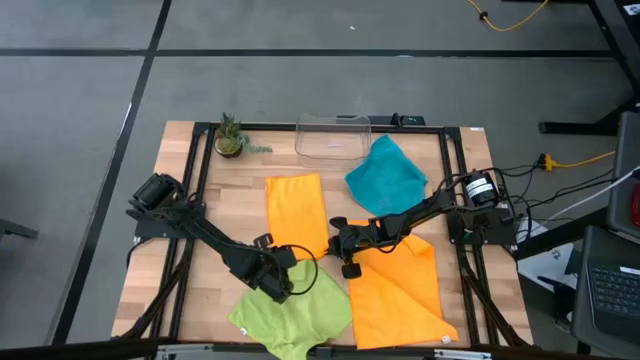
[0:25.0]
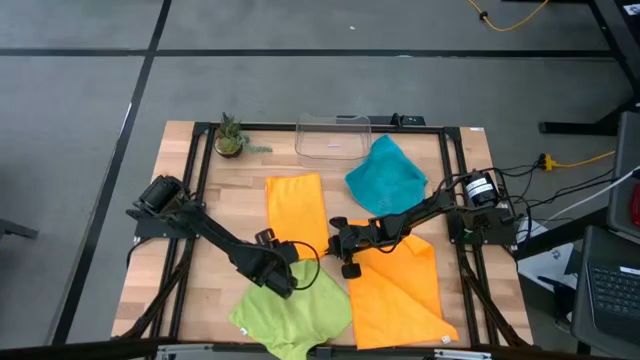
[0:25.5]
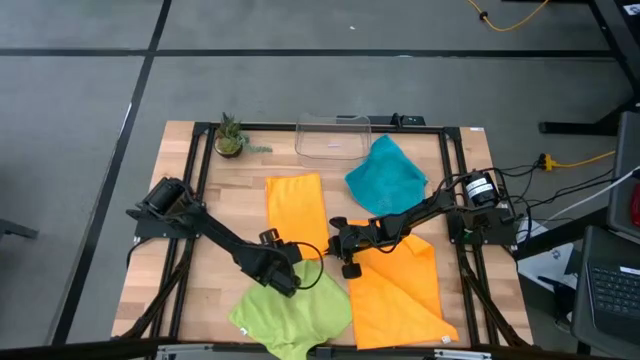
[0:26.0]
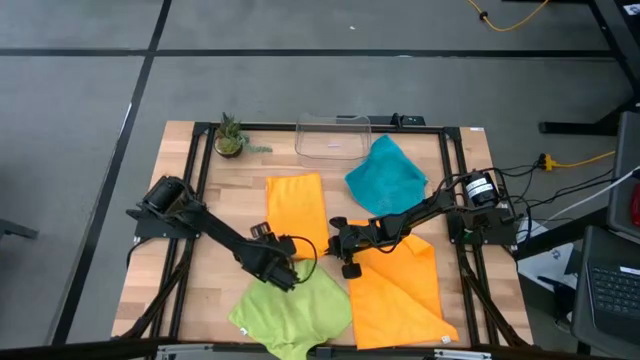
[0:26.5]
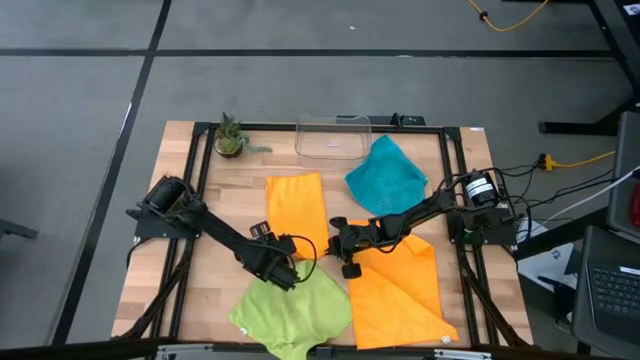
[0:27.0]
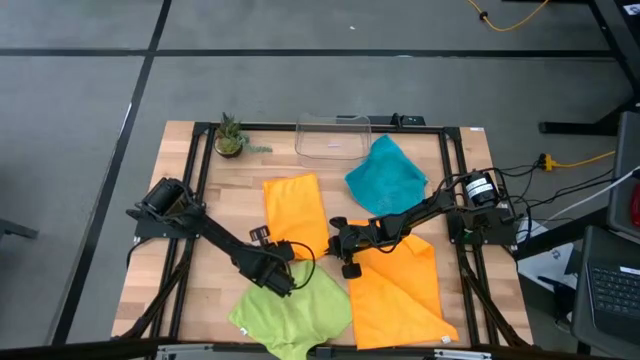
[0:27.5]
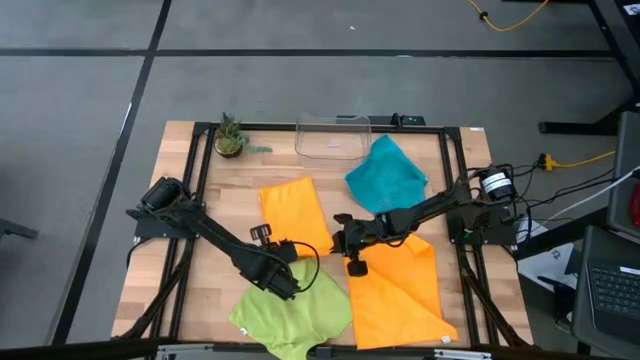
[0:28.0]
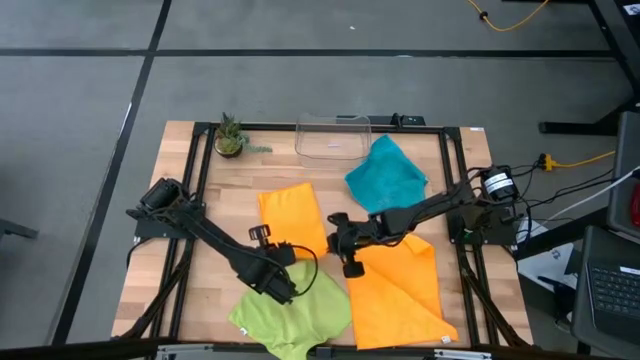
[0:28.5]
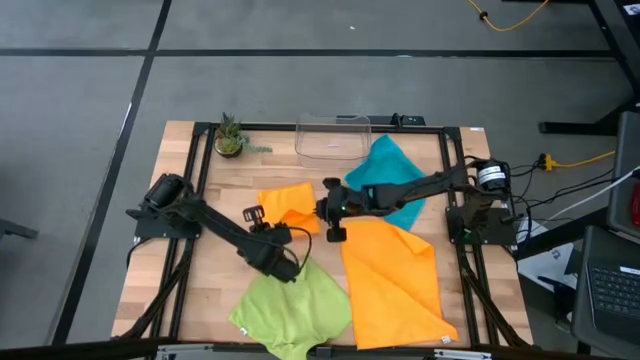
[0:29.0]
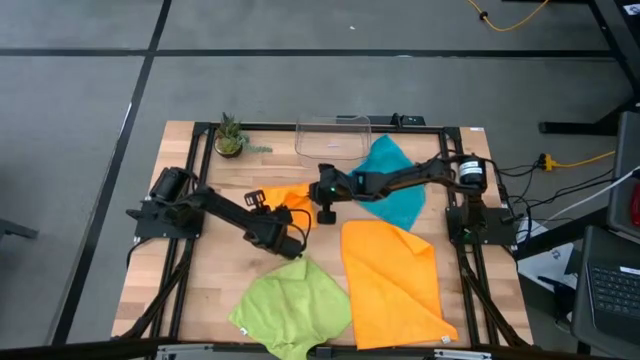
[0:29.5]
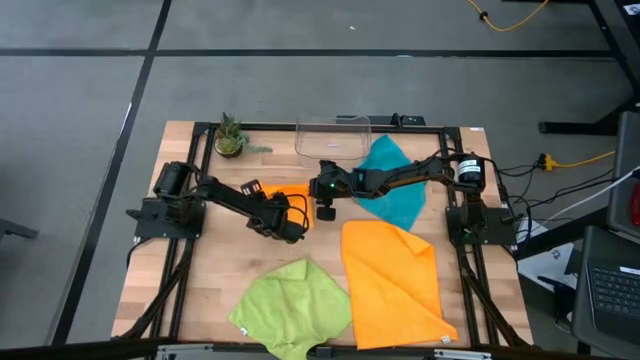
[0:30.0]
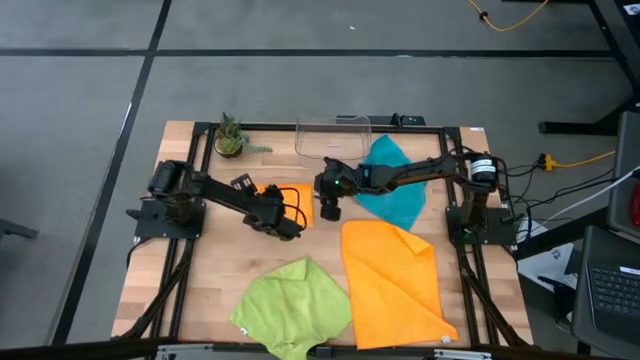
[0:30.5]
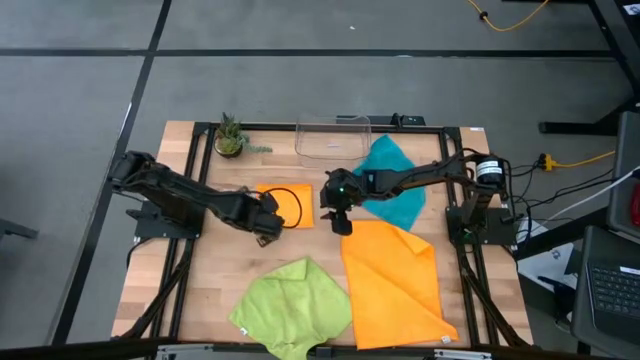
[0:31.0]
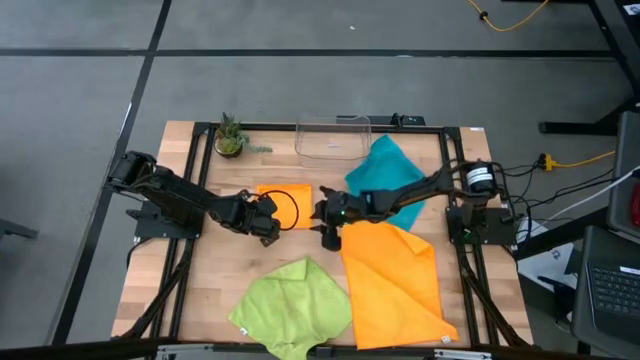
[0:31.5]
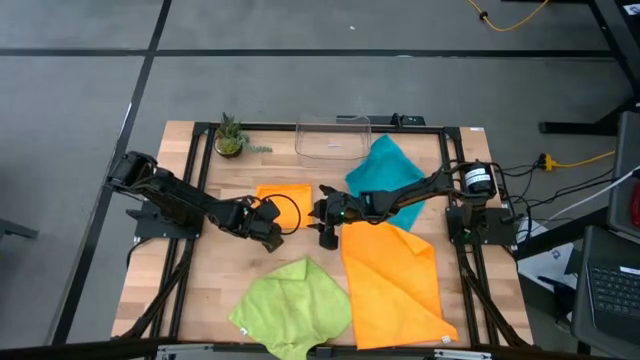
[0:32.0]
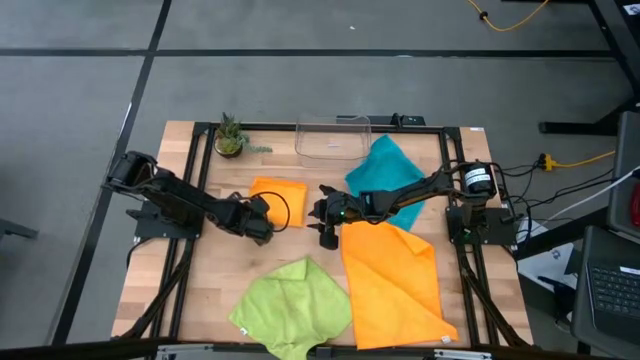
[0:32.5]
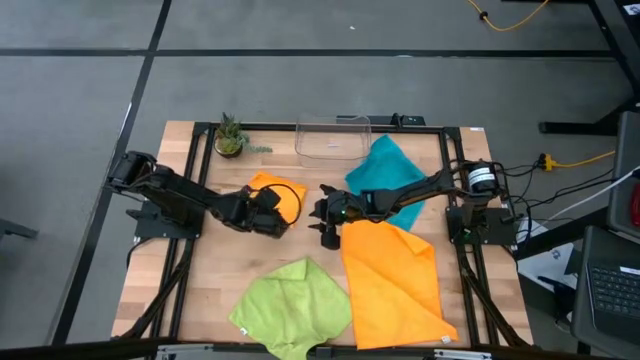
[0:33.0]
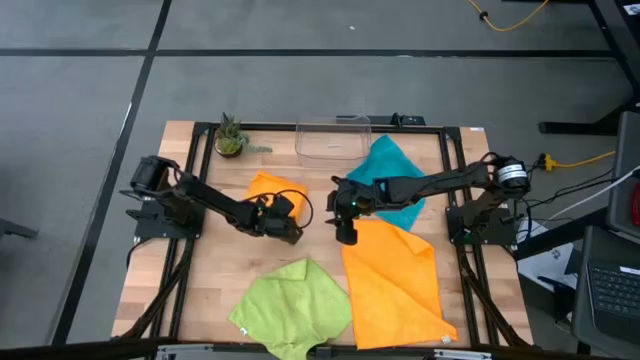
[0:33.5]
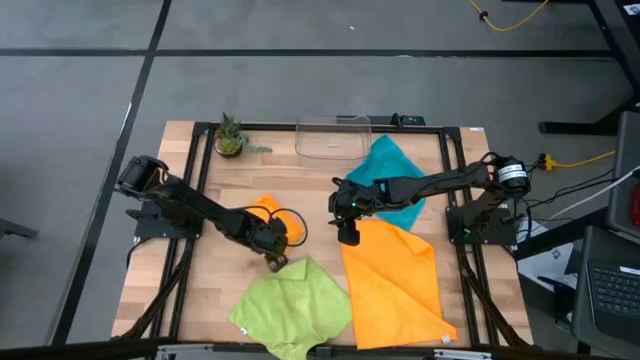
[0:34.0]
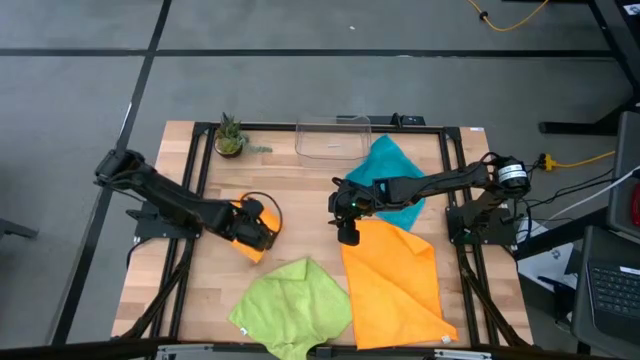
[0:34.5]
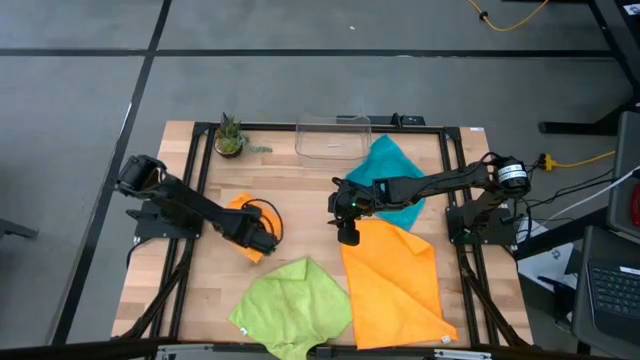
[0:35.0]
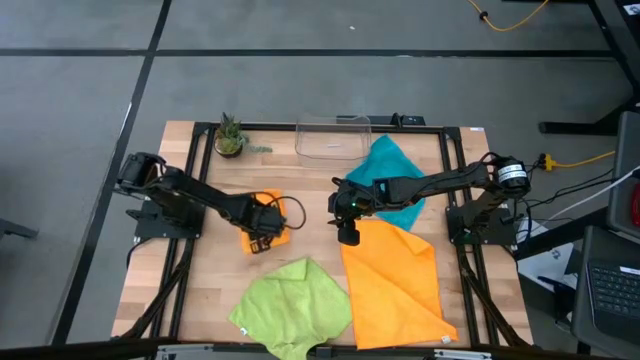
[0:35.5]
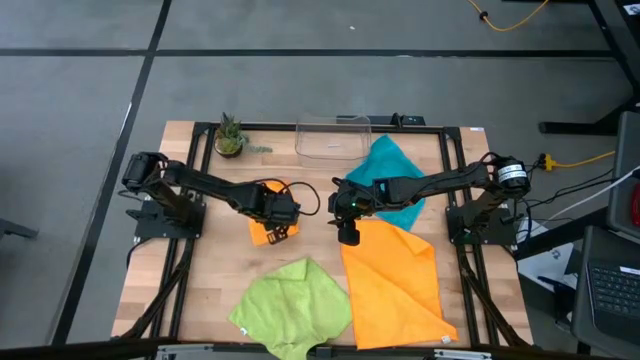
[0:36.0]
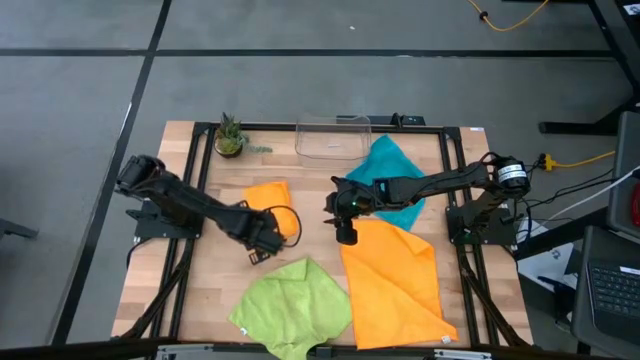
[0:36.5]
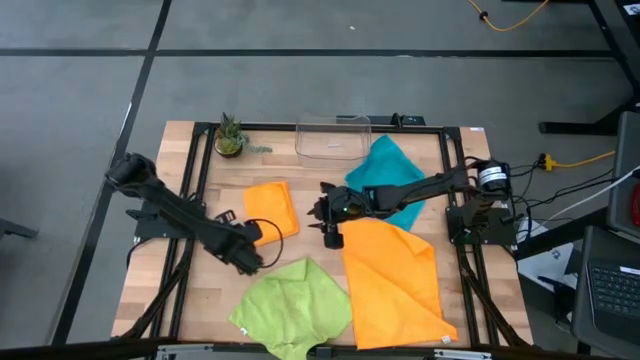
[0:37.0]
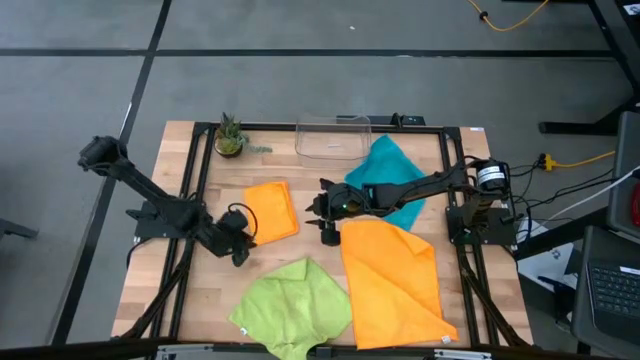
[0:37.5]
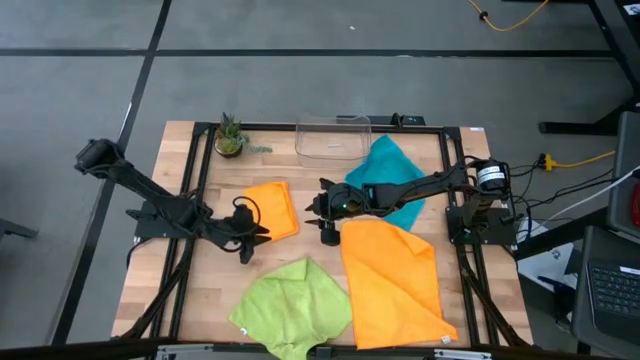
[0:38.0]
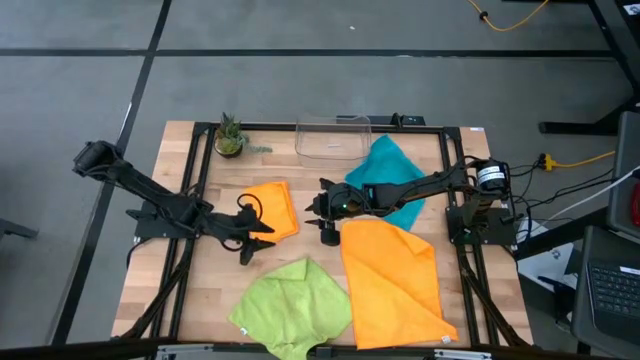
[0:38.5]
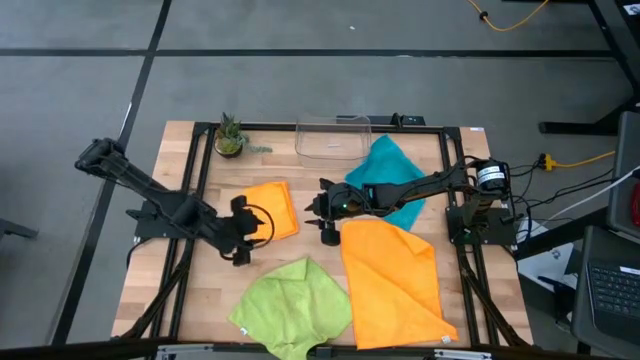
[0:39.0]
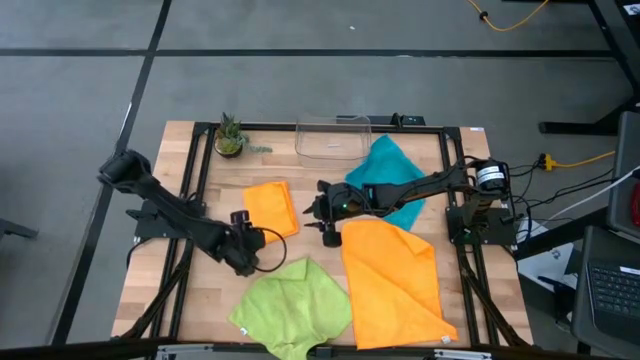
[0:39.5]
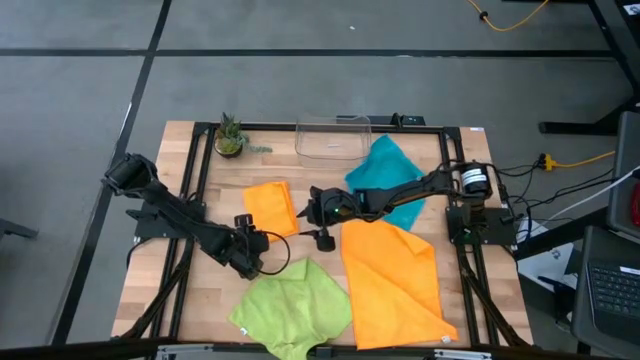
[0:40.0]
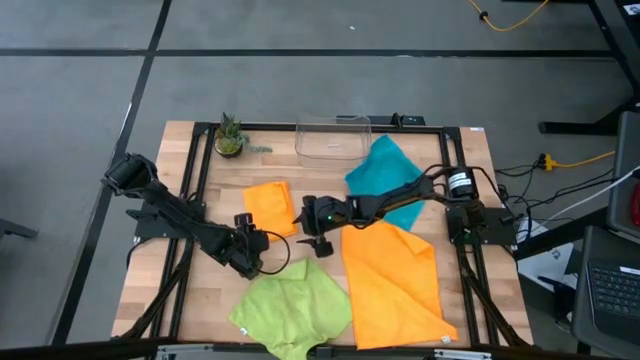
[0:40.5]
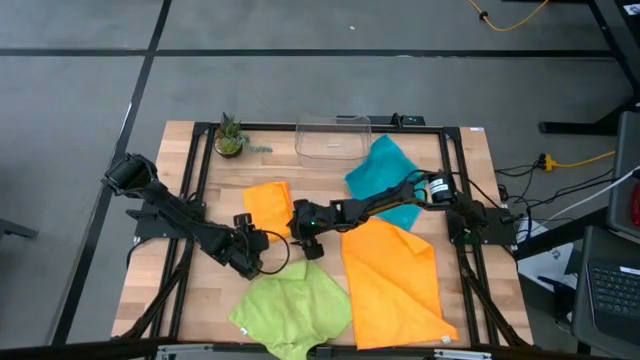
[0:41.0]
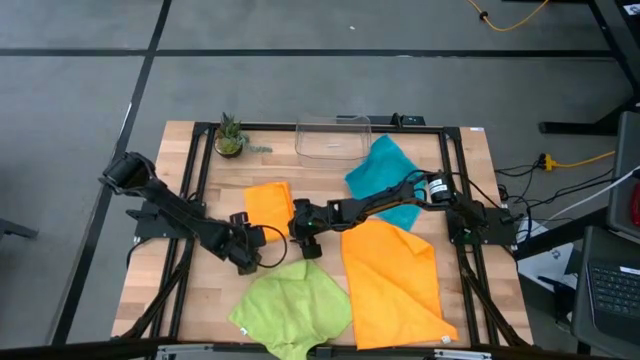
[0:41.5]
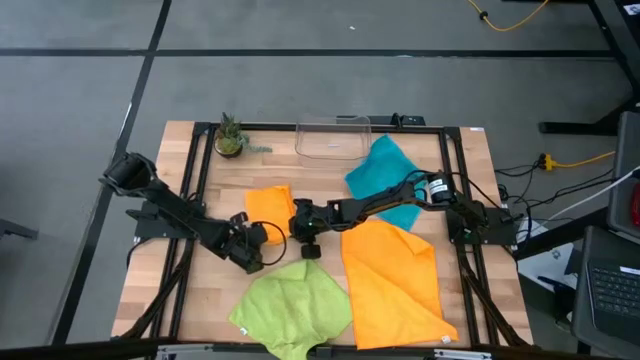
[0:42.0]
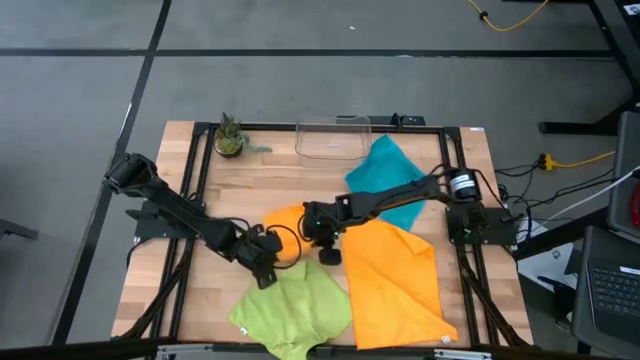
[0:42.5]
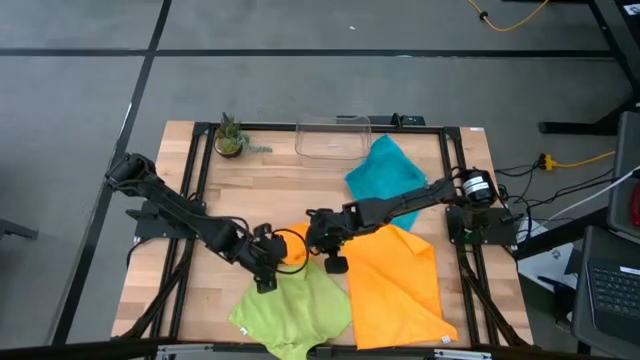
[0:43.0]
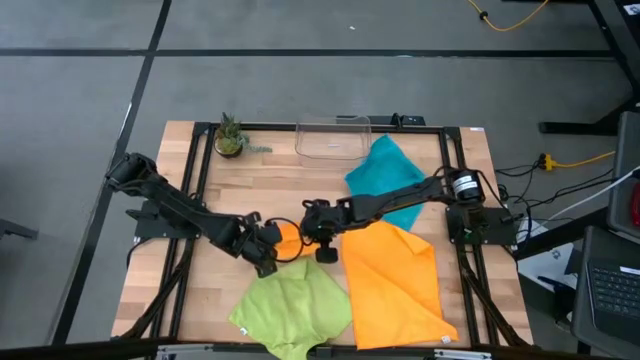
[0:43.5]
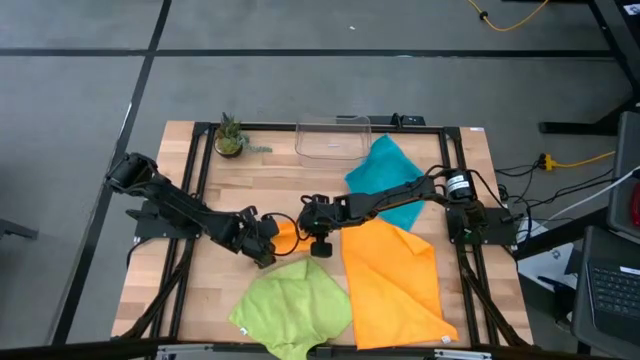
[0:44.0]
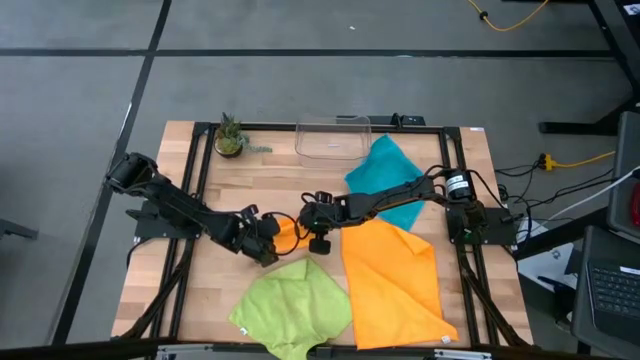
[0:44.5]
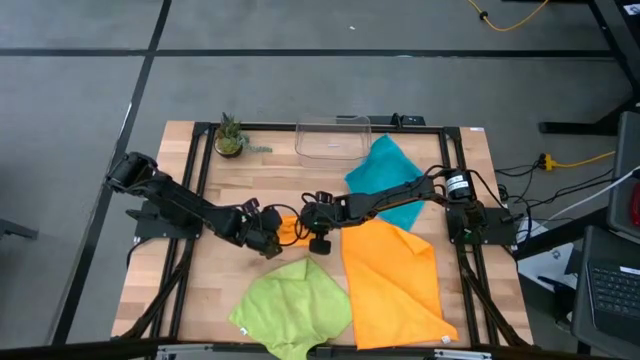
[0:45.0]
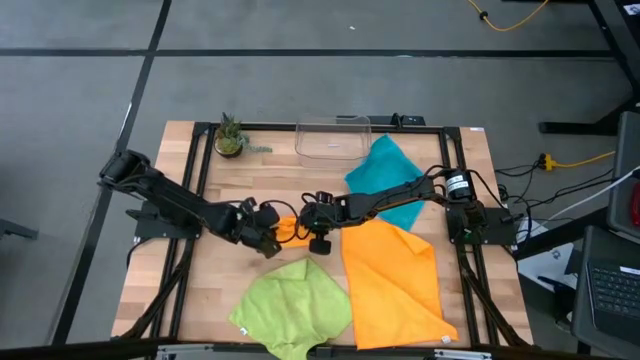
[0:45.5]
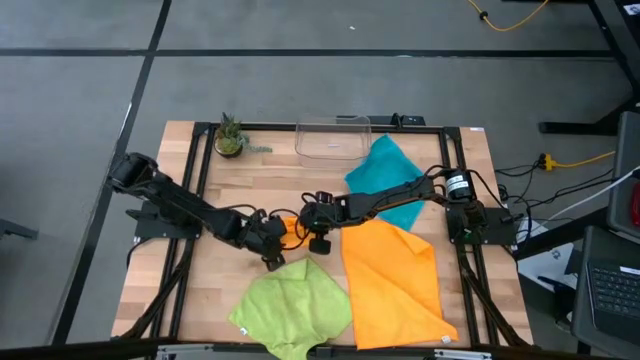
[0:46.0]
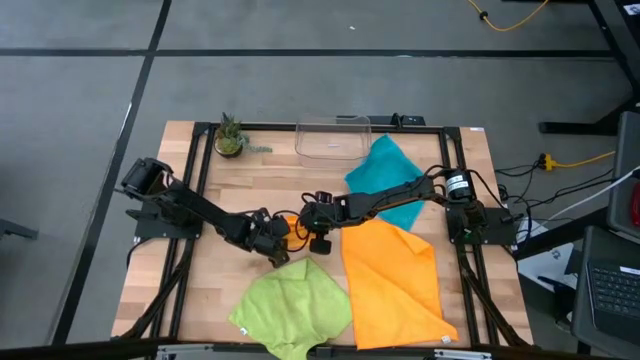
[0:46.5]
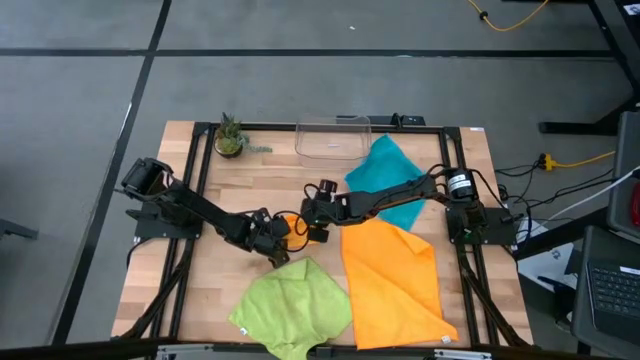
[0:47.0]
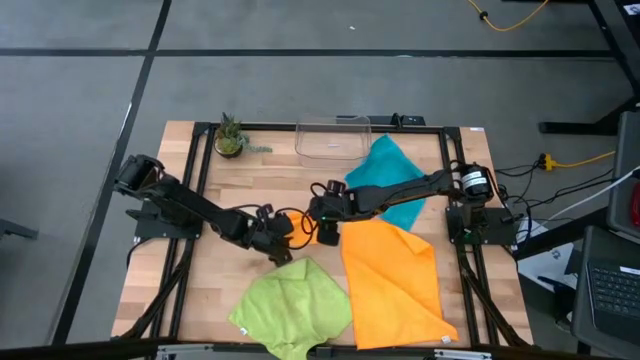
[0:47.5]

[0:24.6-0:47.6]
Task: Fold microfiber towels
Fold the orange microfiber cloth
